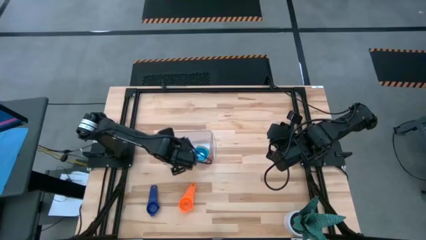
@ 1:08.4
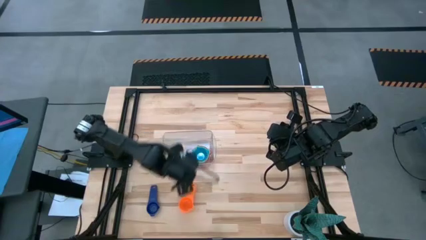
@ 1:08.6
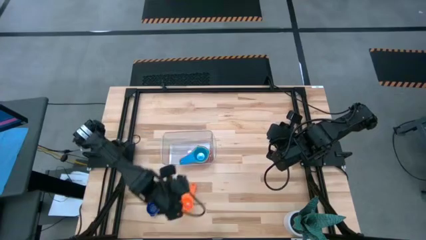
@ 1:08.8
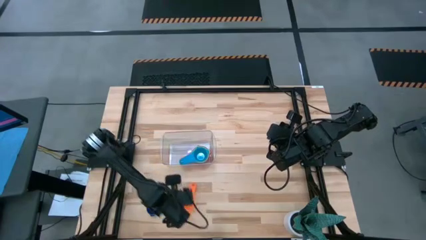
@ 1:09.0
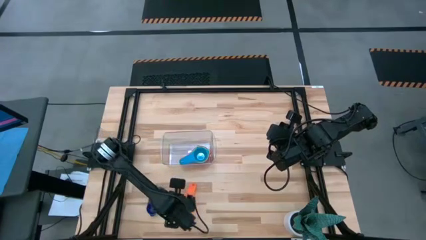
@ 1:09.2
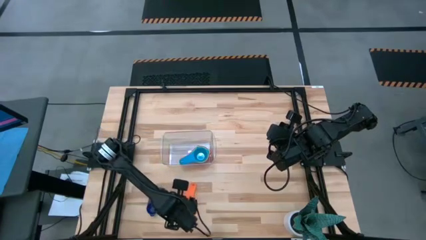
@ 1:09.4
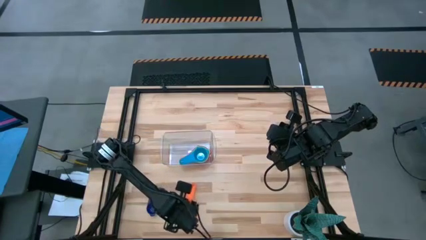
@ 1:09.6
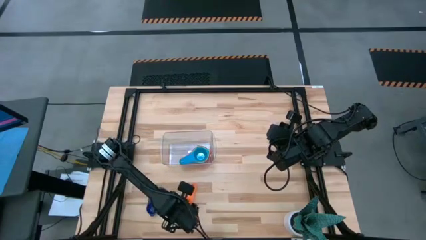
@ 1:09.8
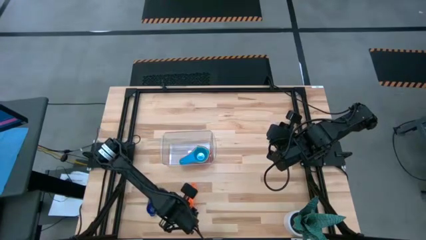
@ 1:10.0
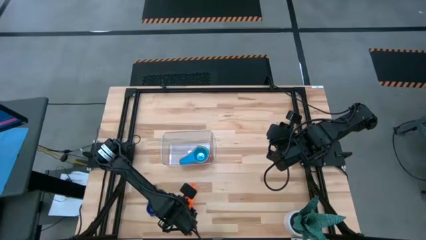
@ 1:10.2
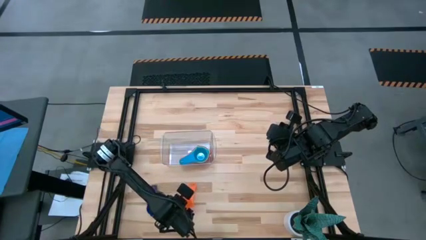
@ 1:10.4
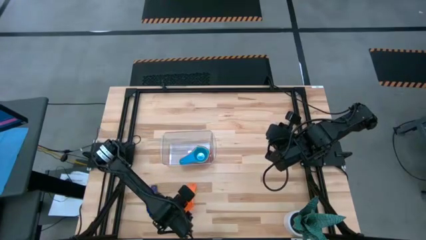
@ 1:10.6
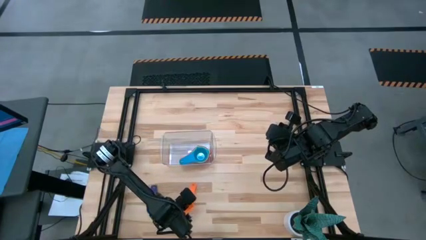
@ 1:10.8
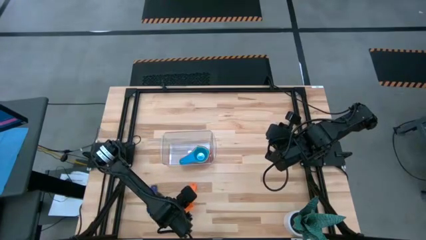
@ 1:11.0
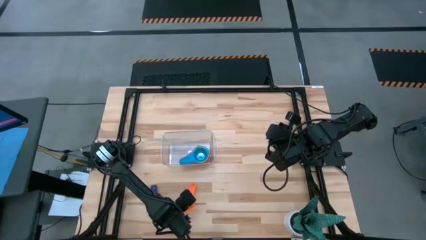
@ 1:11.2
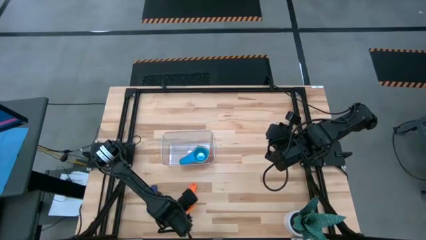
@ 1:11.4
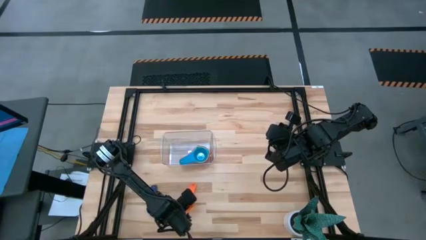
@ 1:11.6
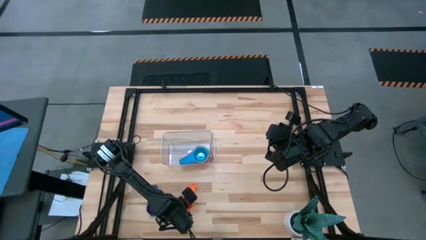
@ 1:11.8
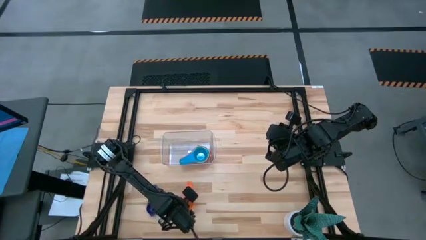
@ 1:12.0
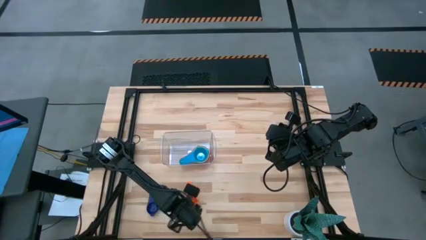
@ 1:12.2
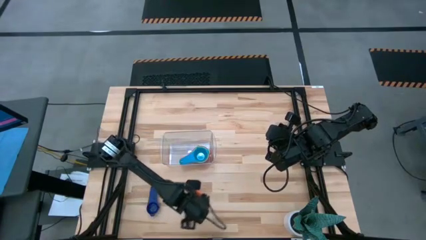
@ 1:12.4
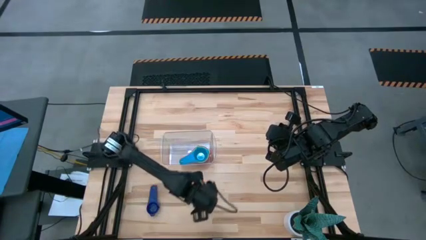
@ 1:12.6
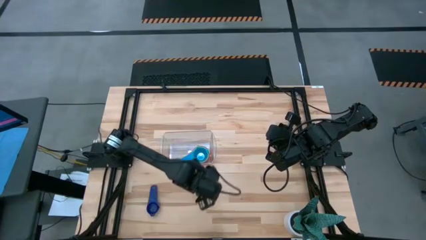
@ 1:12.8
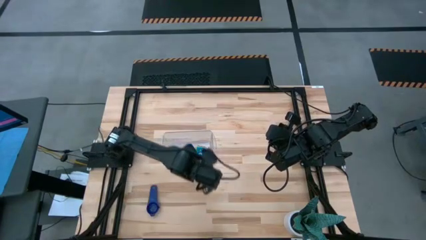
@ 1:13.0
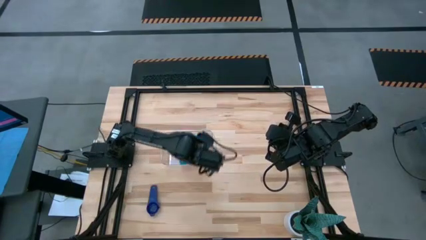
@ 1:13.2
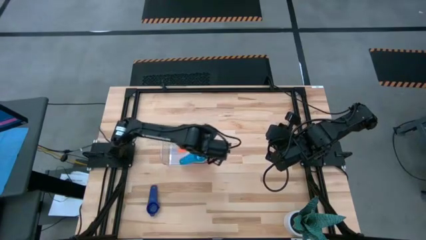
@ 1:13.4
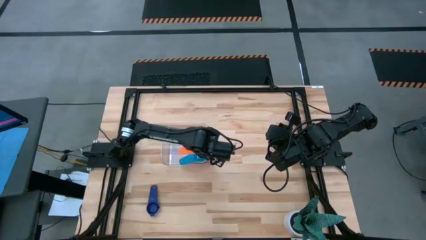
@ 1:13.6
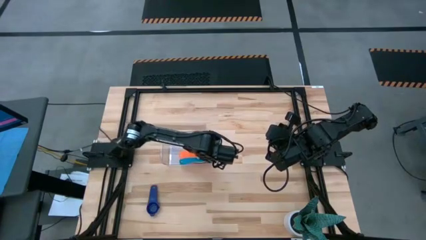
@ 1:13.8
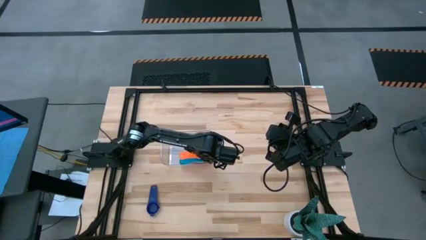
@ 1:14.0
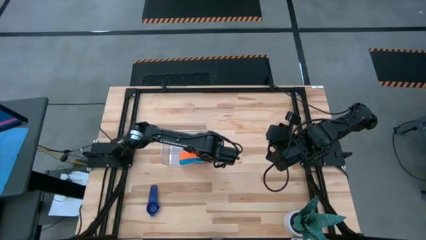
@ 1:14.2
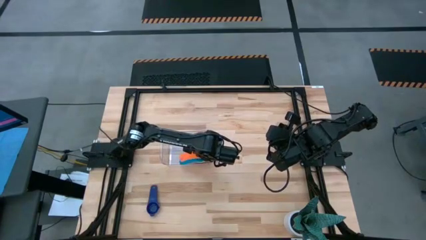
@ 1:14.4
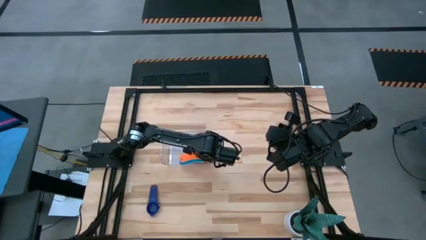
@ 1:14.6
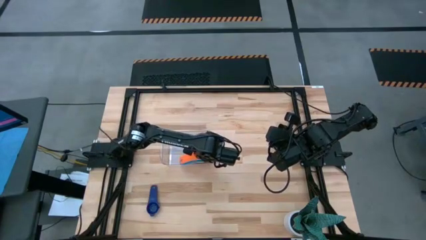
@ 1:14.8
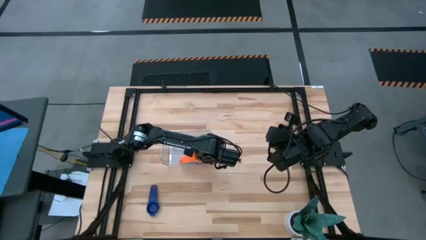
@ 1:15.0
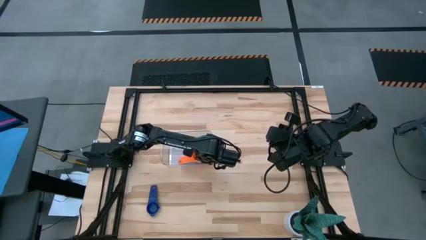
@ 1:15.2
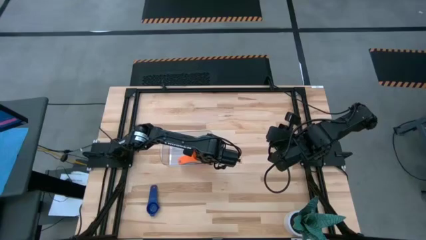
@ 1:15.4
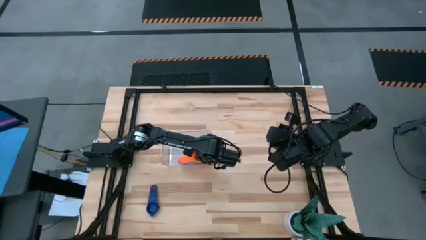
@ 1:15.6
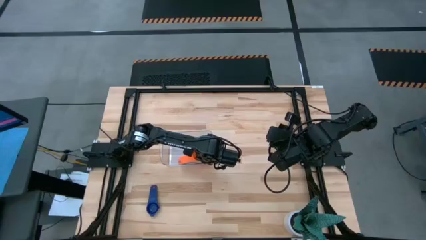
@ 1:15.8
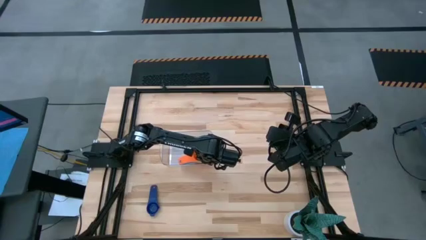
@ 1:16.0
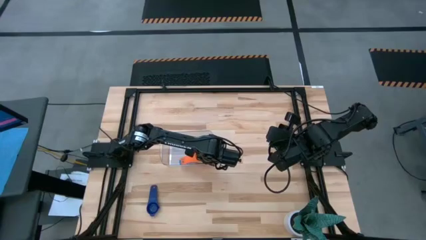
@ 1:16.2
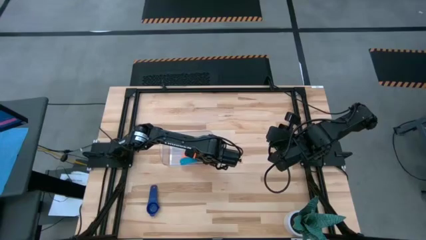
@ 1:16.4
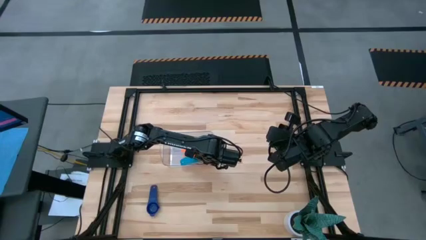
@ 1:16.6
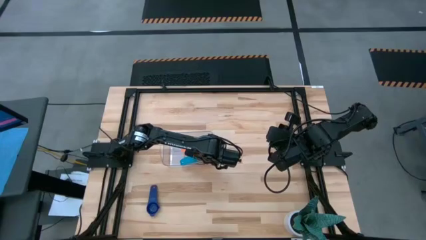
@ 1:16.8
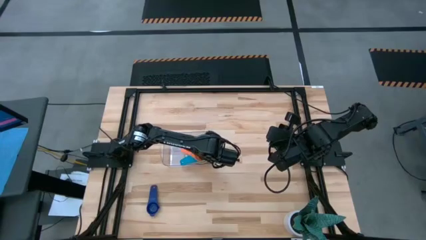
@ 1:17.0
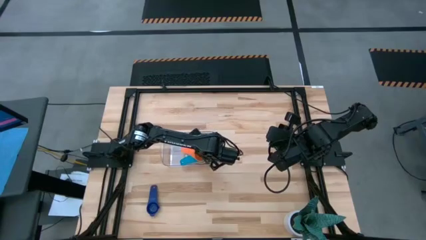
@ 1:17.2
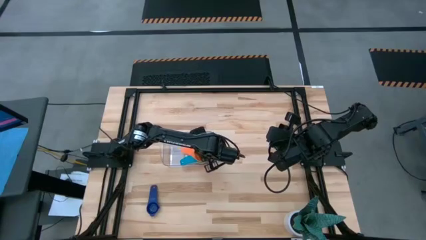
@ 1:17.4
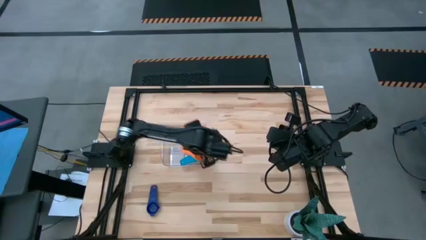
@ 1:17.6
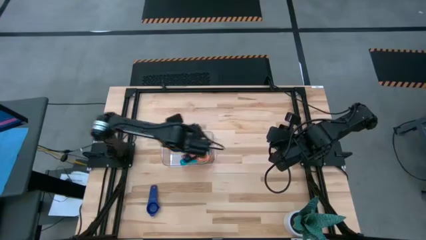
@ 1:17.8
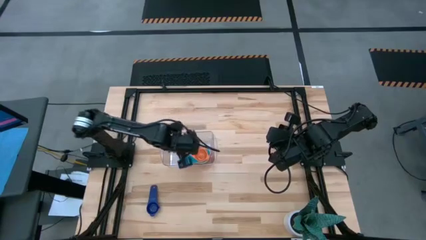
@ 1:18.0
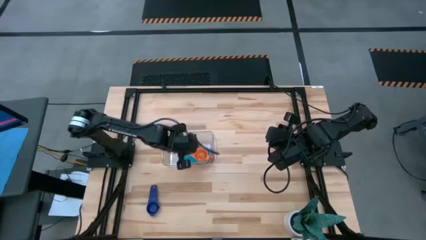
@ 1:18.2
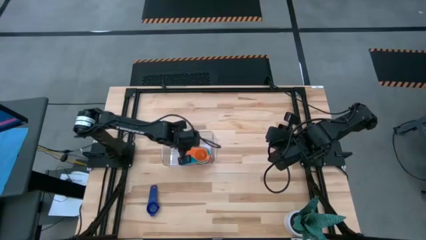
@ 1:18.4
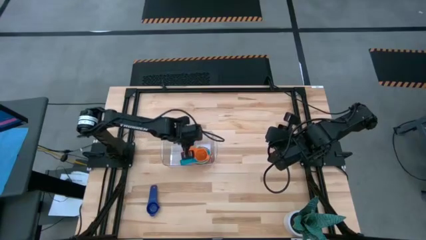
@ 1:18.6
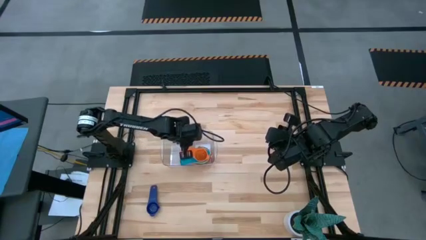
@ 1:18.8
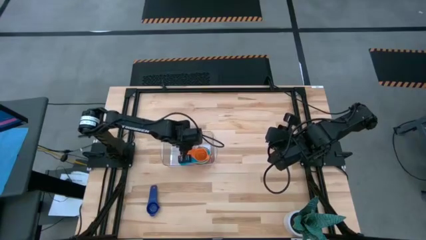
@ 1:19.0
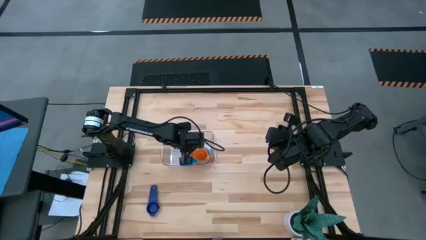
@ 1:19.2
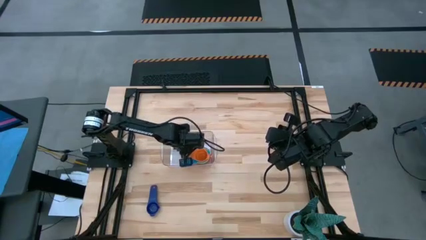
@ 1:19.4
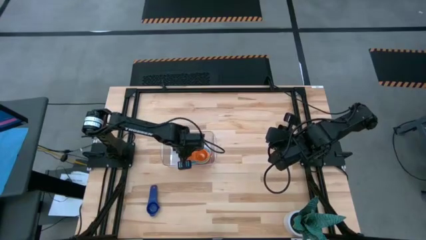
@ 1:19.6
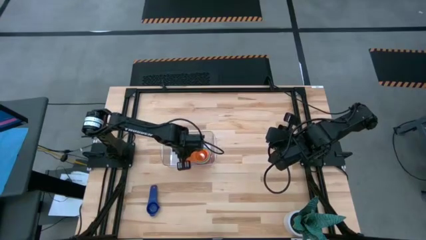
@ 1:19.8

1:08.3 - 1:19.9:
Task: Nest measuring cups in basket
Stack the orange measuring cup on top the light blue measuring cup in the transparent bin

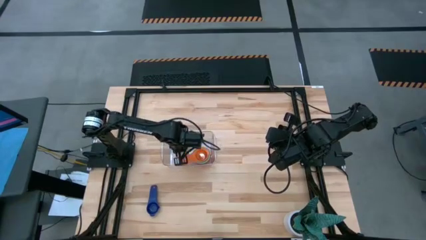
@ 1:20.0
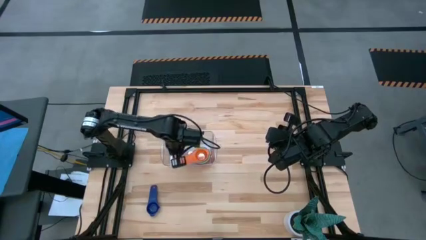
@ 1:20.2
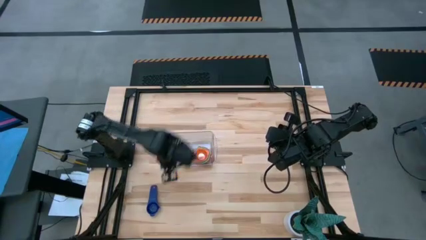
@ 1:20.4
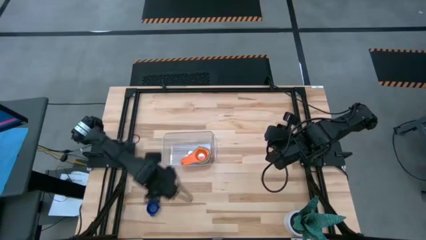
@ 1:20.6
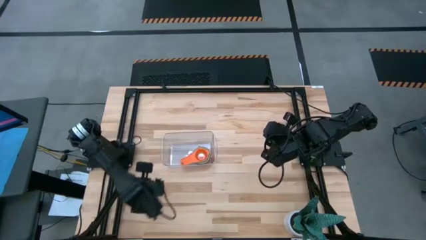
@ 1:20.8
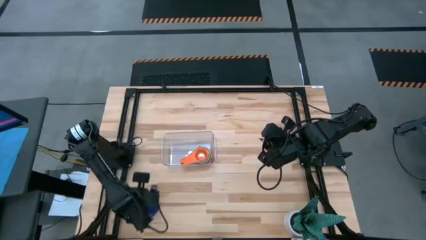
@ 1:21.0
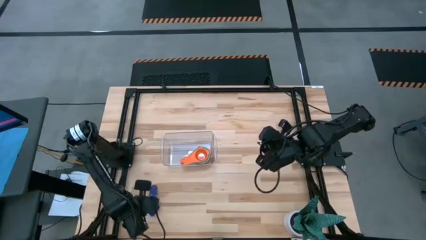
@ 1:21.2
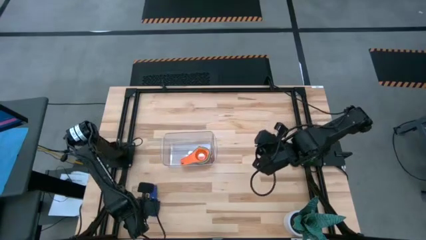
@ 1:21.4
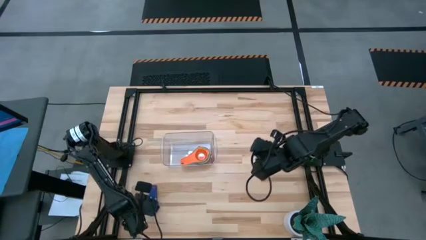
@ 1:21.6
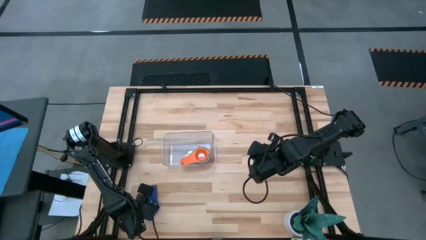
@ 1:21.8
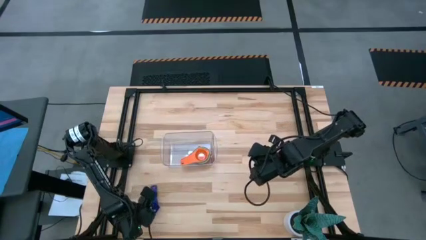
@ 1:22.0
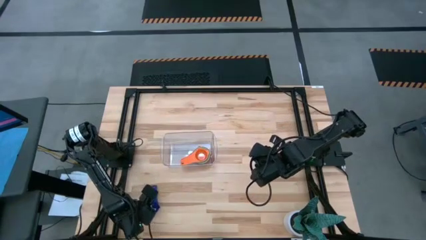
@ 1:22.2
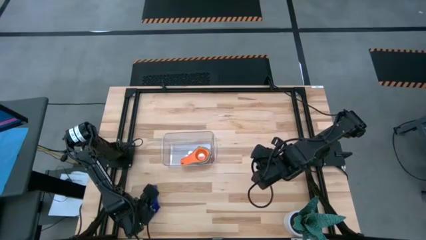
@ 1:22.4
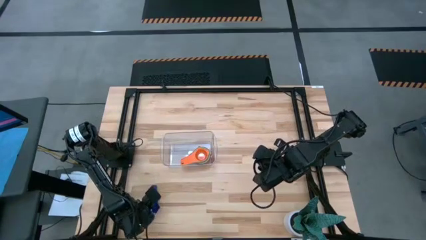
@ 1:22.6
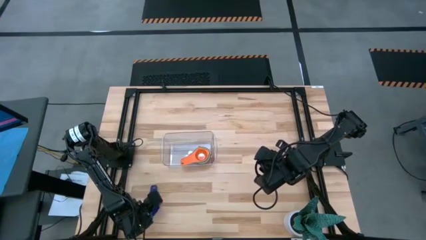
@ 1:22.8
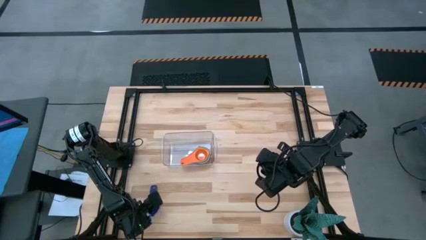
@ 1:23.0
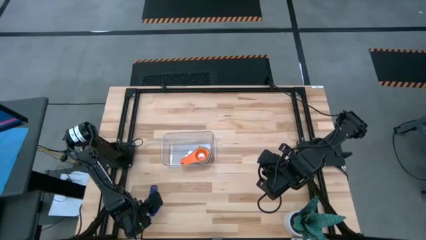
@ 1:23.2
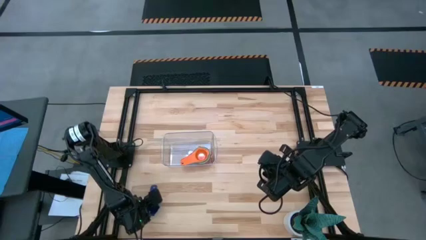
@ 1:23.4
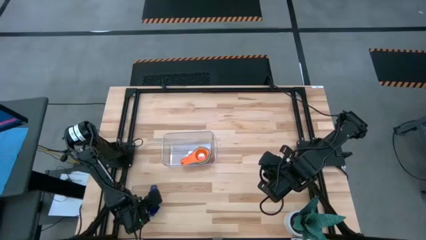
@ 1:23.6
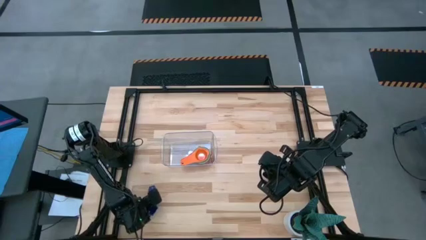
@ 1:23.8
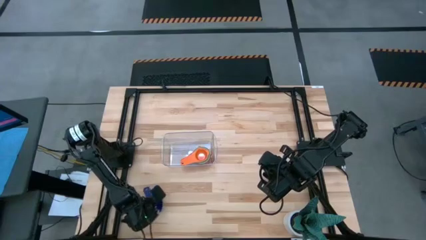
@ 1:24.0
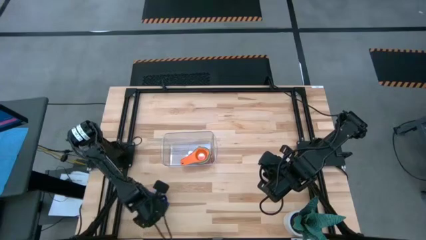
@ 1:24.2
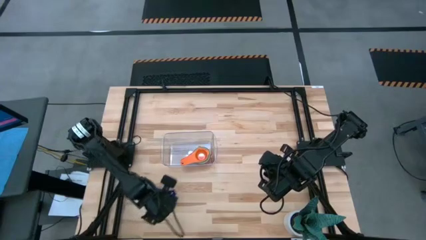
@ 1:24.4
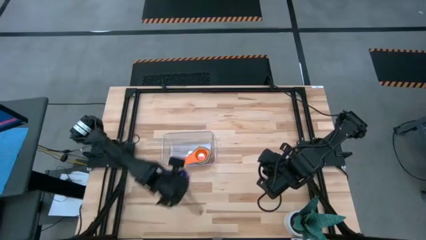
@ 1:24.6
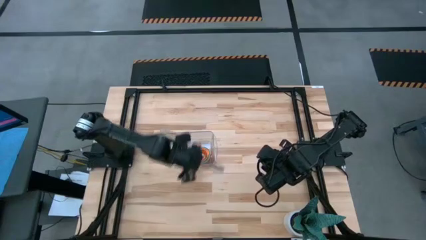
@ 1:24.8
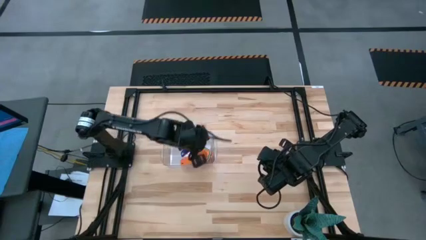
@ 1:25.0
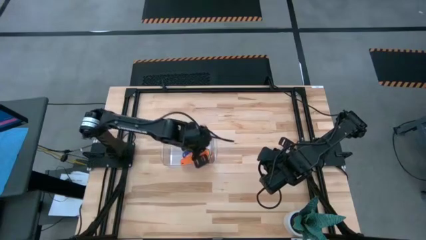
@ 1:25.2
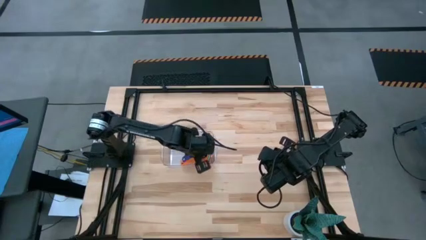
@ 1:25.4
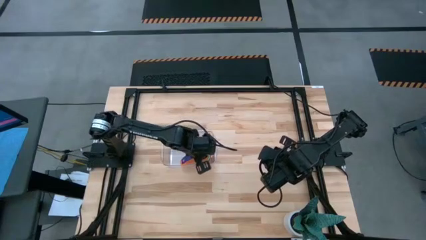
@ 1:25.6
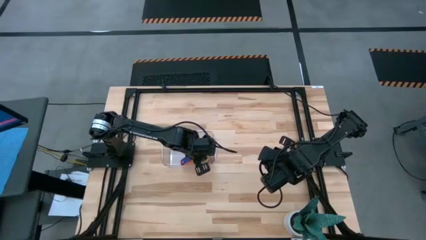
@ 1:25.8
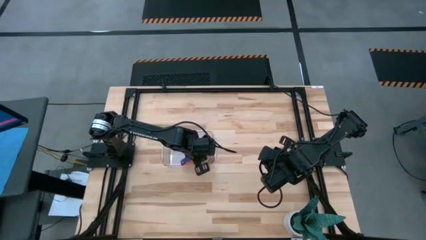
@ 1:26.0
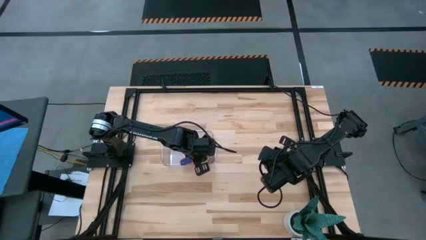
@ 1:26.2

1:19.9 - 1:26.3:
Stack the dark blue measuring cup on top of the orange measuring cup in the transparent bin
